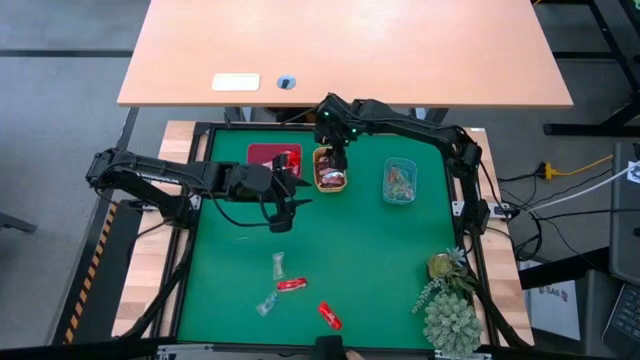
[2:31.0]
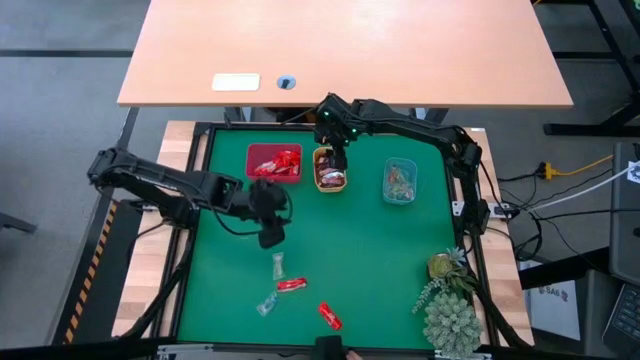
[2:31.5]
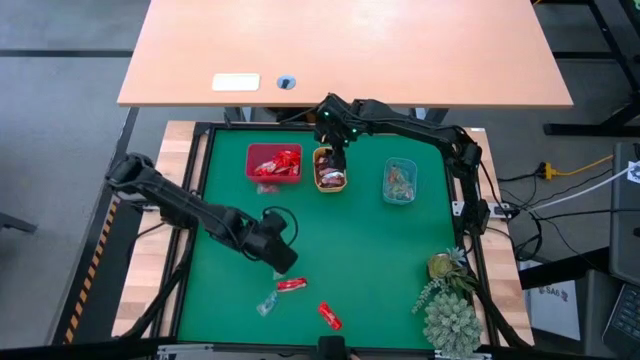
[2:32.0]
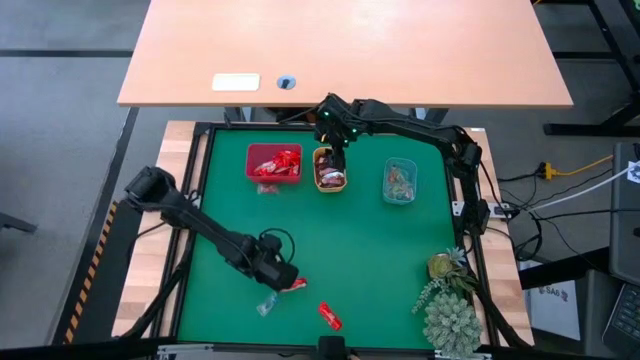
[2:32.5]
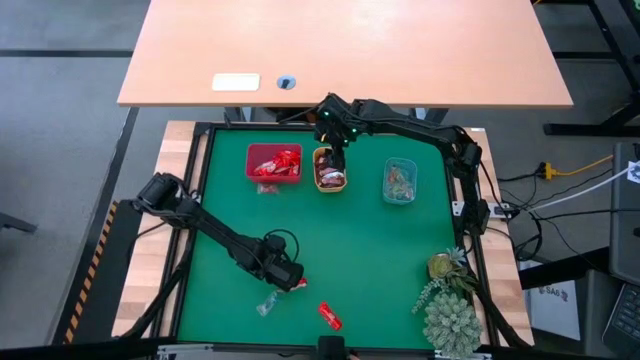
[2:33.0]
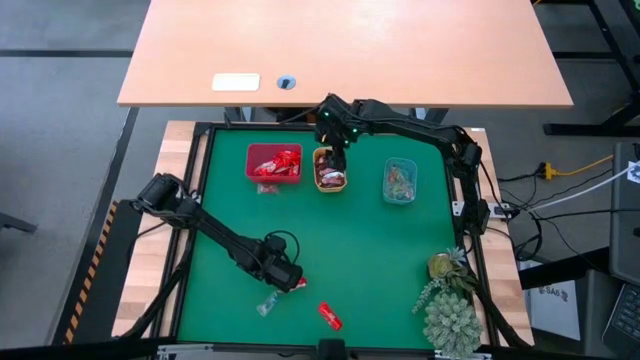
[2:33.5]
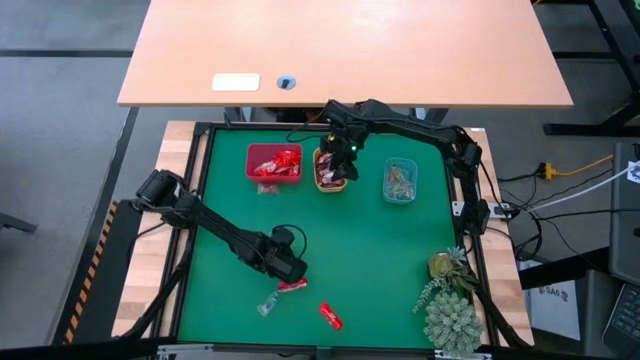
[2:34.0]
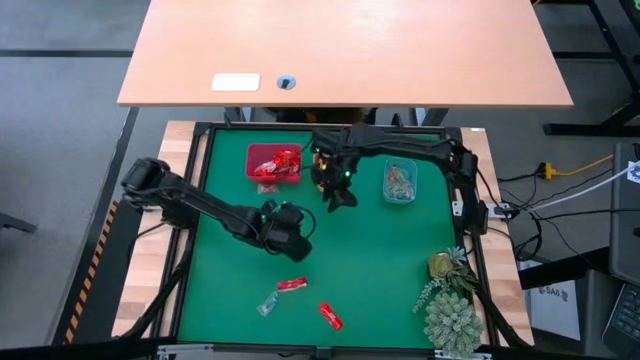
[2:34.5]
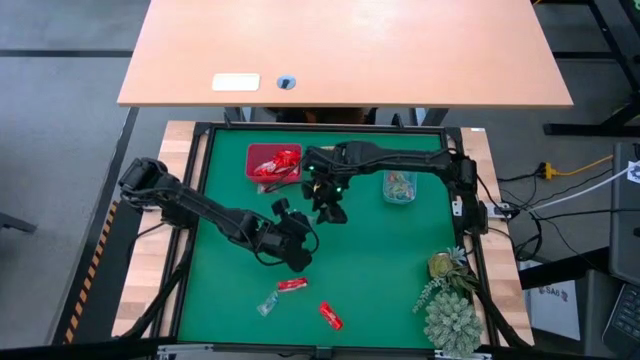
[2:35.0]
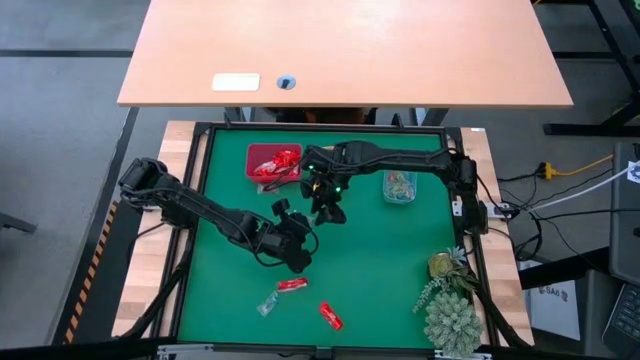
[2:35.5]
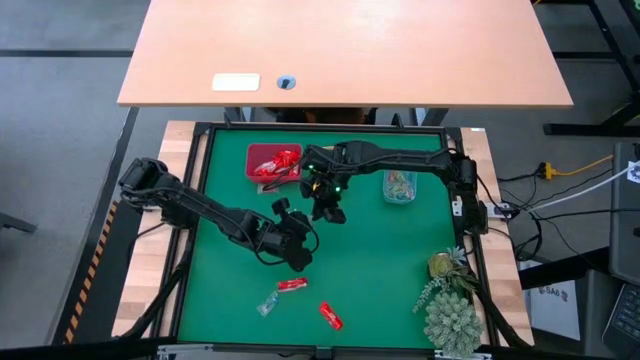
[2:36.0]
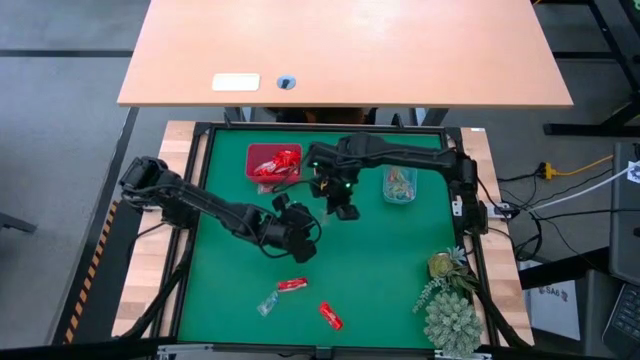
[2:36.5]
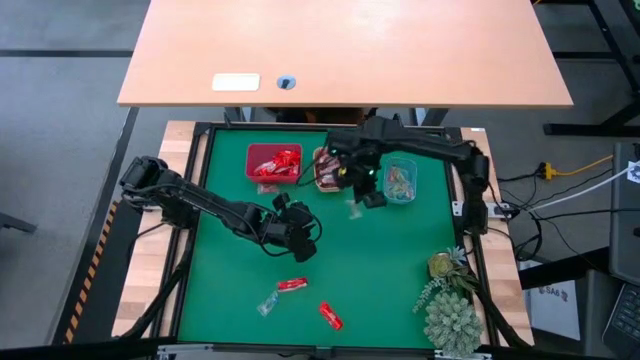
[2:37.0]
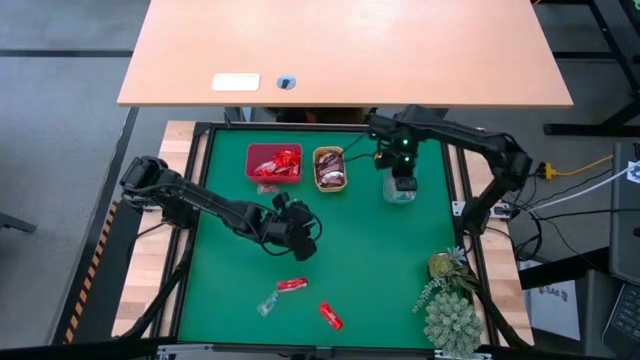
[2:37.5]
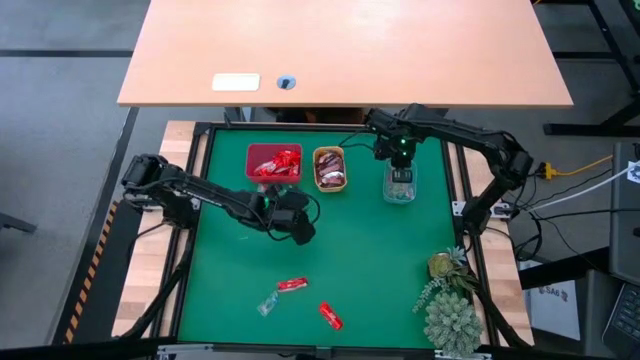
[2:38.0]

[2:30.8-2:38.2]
Task: Sort candy
Put the green gummy into the blue bin

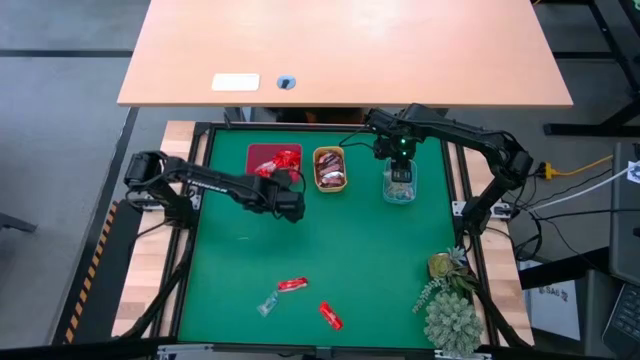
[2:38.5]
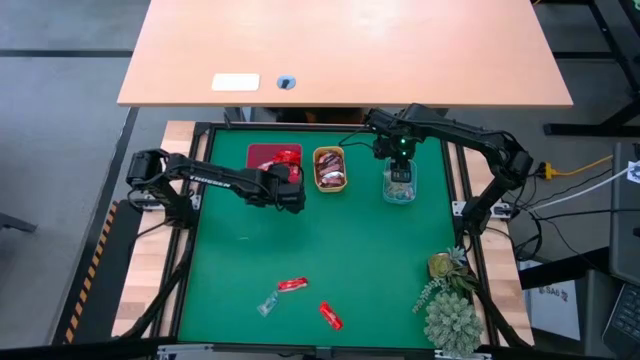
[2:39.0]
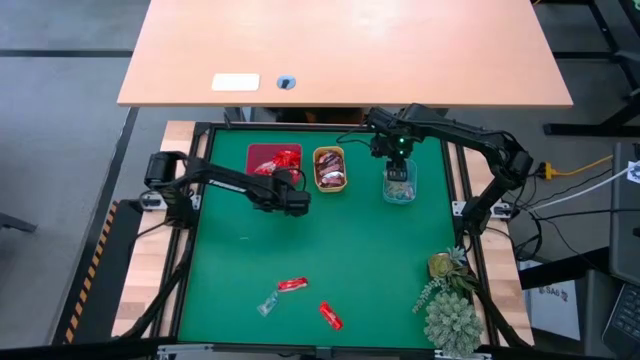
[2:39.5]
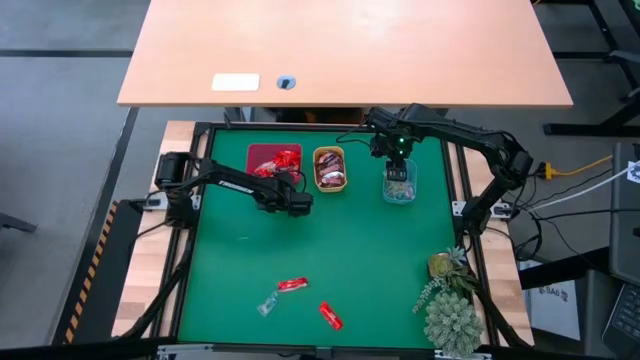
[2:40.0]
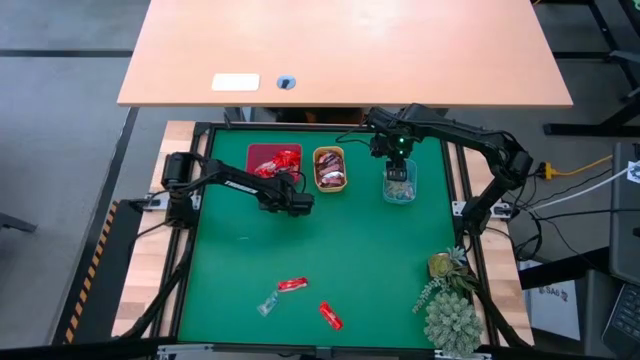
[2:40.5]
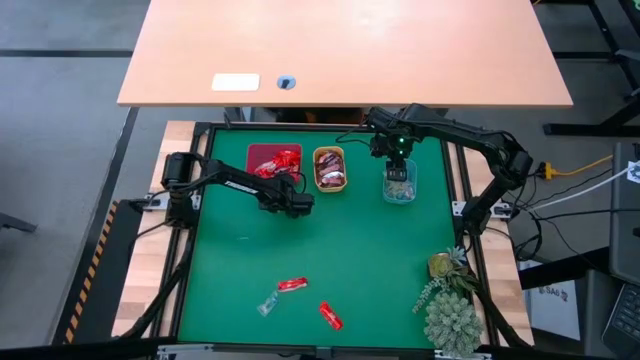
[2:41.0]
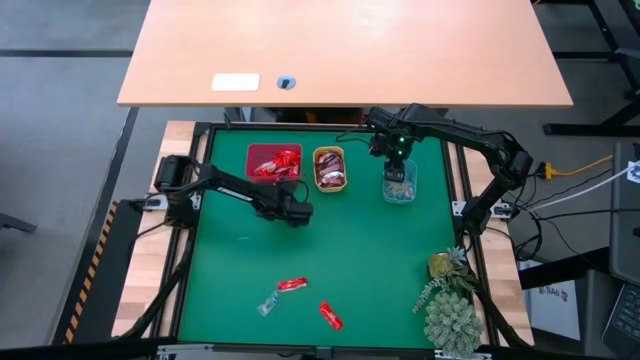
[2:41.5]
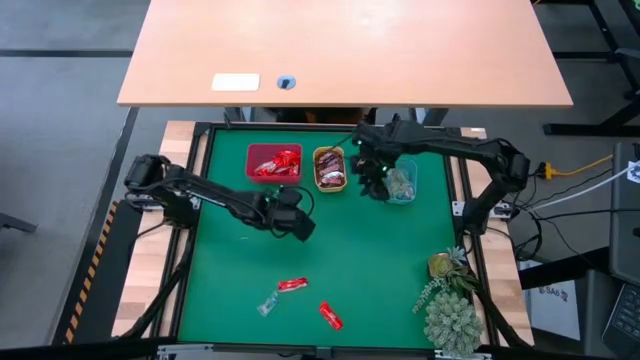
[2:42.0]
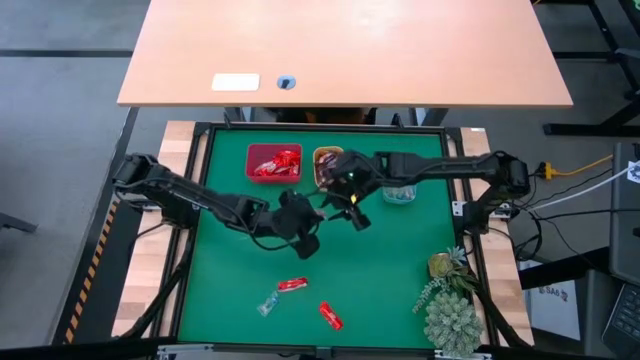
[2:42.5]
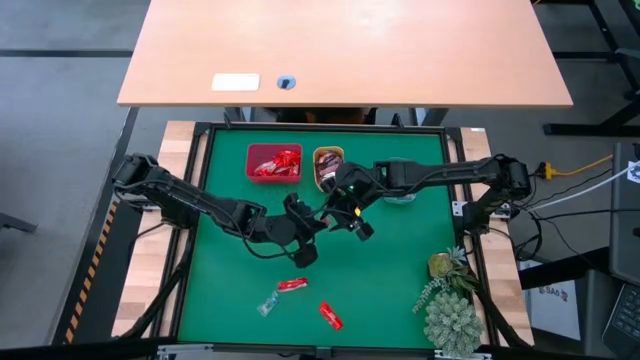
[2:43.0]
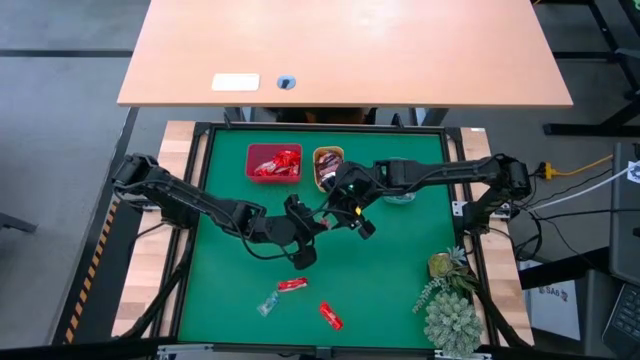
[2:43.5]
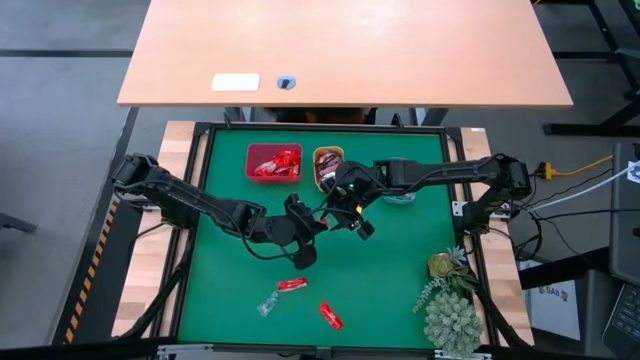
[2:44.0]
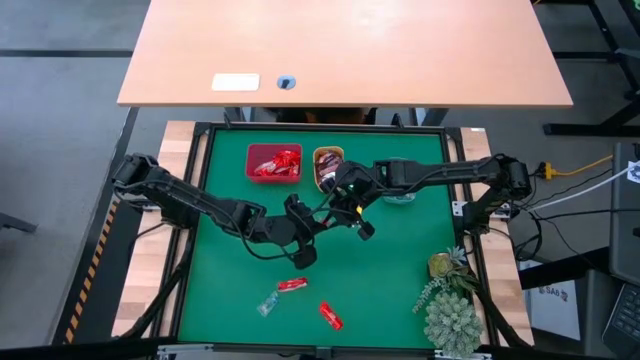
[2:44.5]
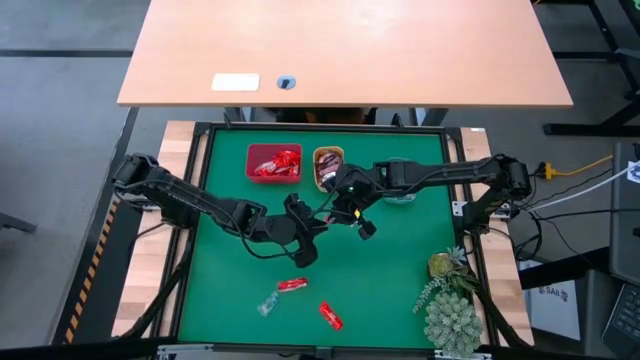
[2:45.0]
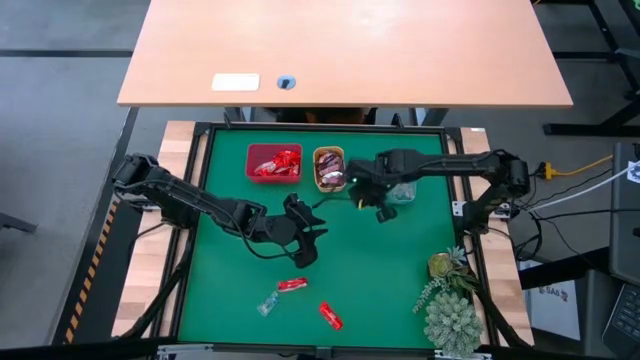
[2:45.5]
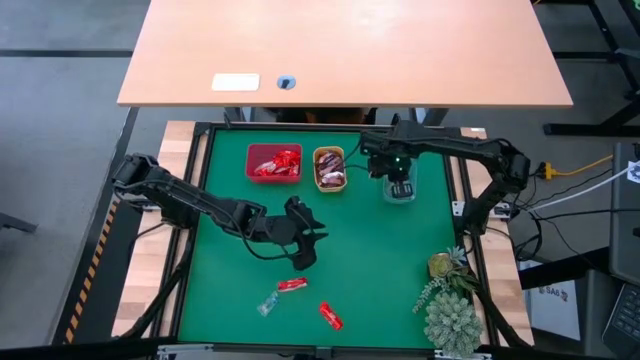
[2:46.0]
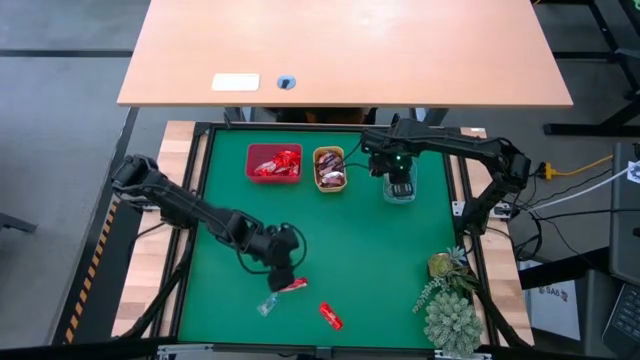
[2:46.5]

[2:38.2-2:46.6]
Put the orange gummy into the blue bin

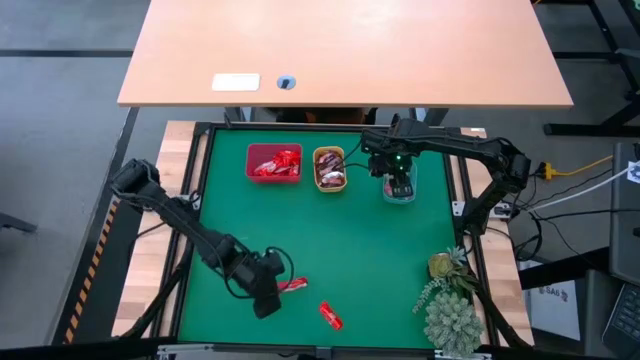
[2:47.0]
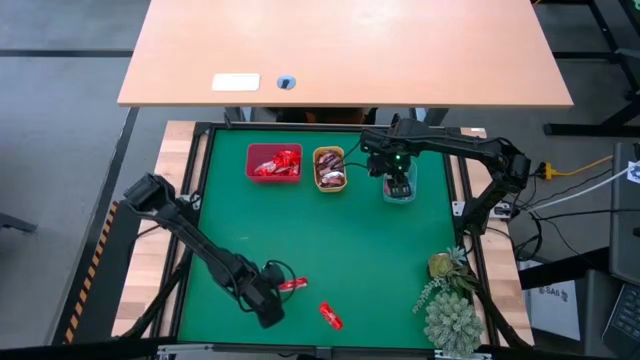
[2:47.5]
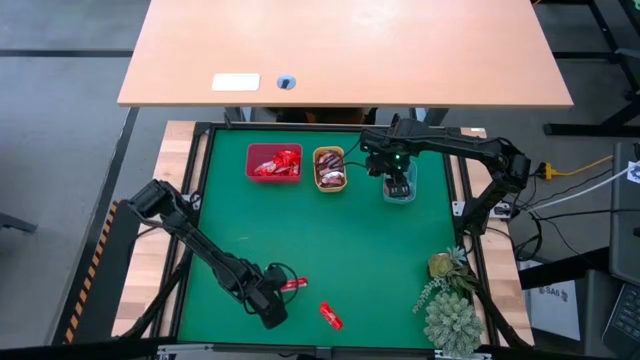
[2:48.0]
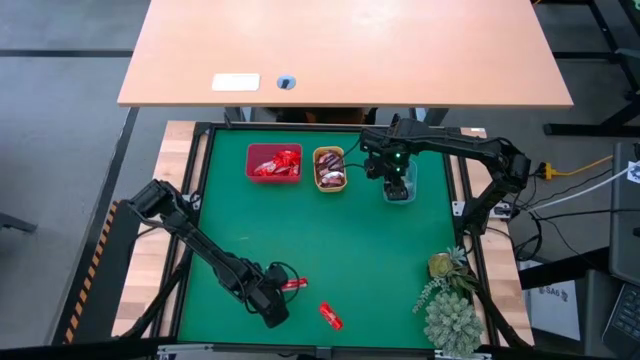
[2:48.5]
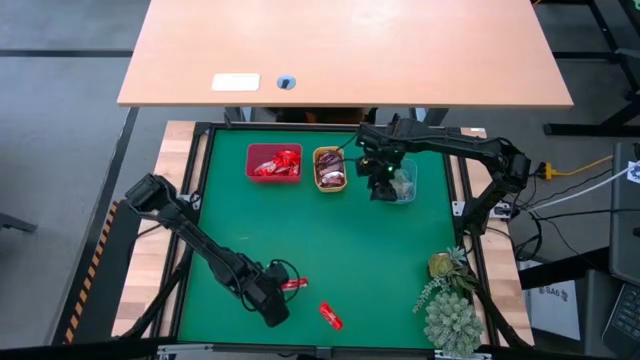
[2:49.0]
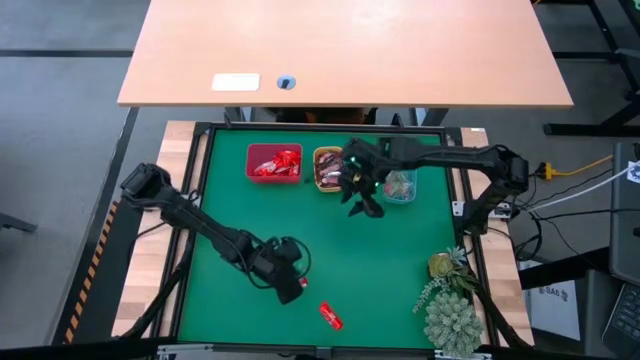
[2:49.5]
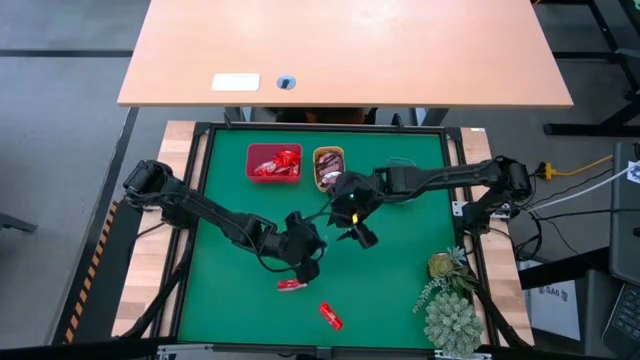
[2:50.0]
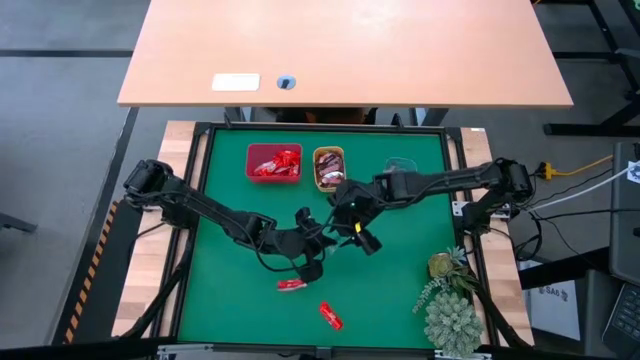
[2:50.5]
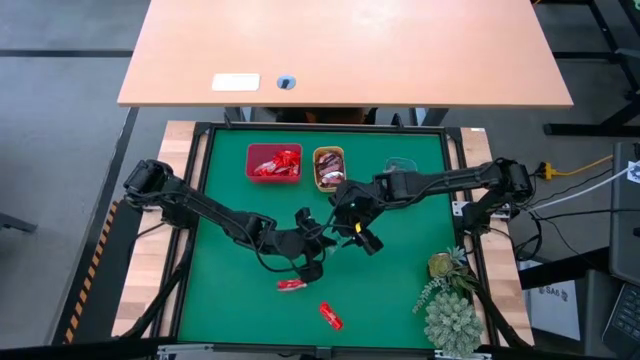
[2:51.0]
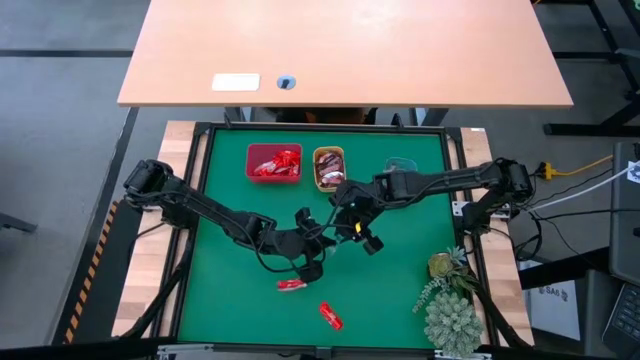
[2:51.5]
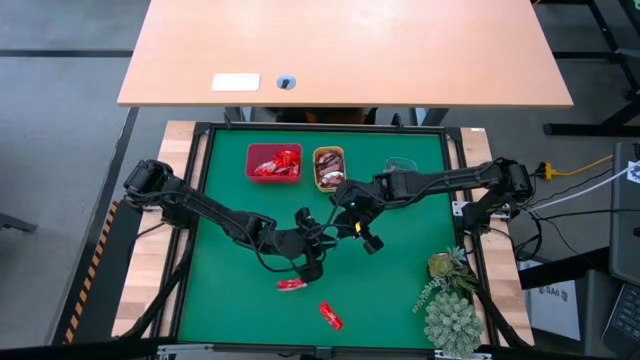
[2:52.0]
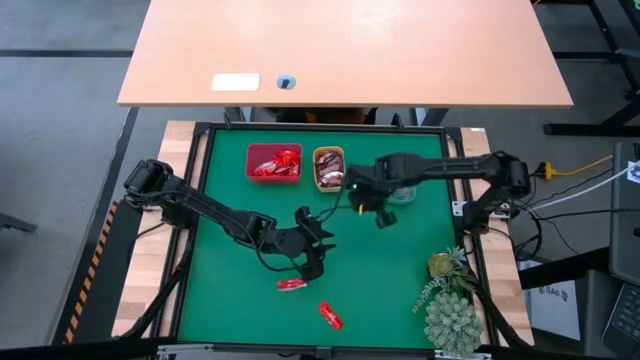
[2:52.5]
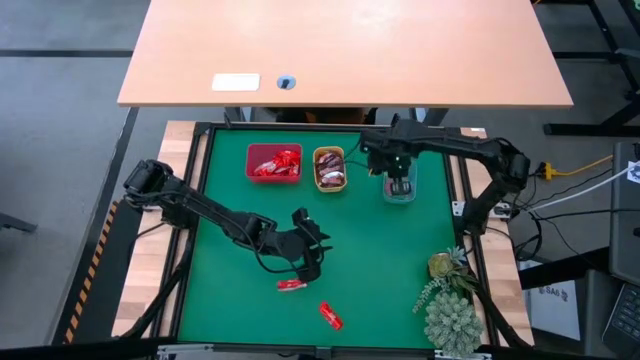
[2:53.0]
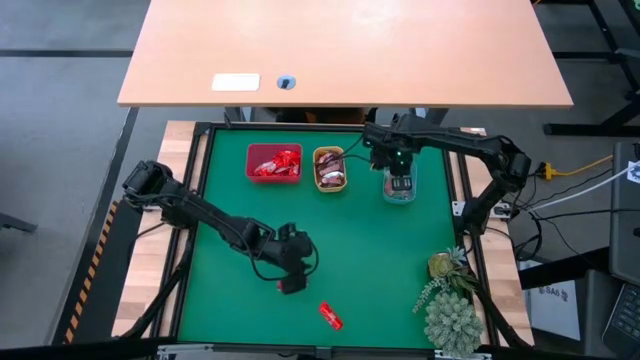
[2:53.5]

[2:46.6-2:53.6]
Put the blue gummy into the blue bin
